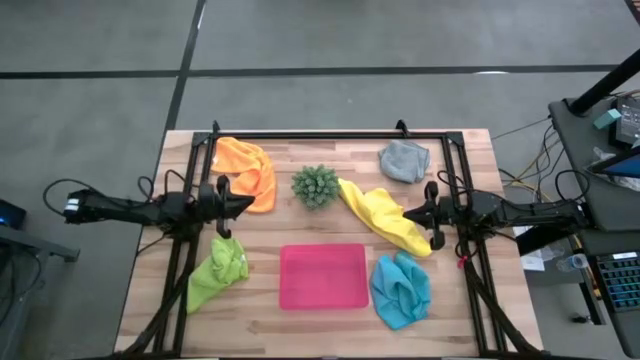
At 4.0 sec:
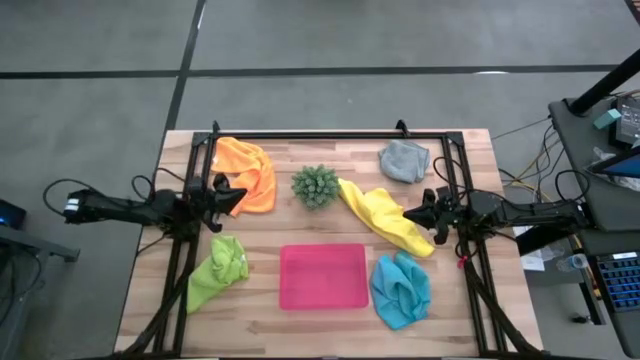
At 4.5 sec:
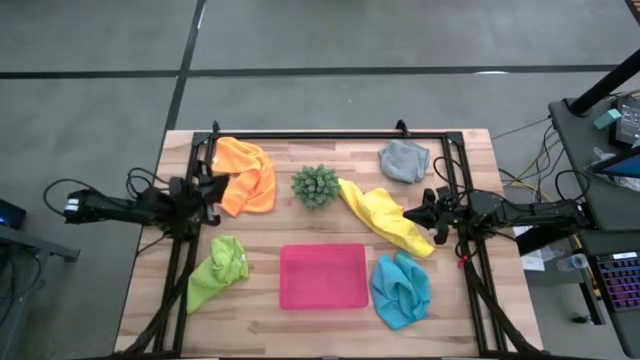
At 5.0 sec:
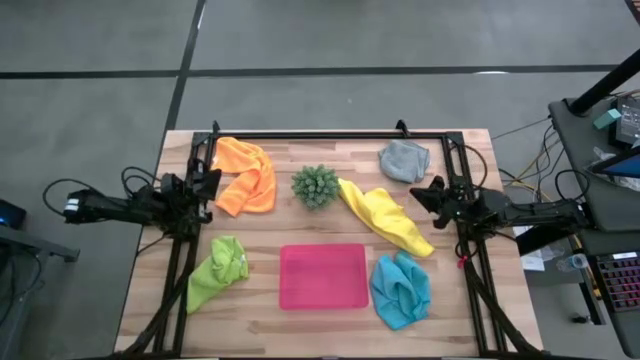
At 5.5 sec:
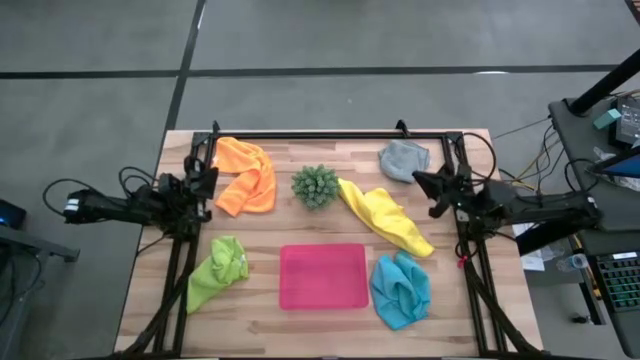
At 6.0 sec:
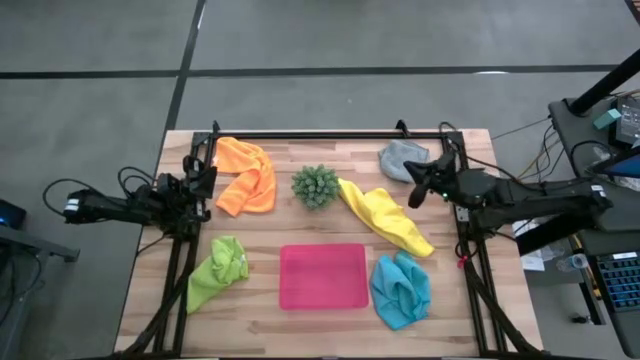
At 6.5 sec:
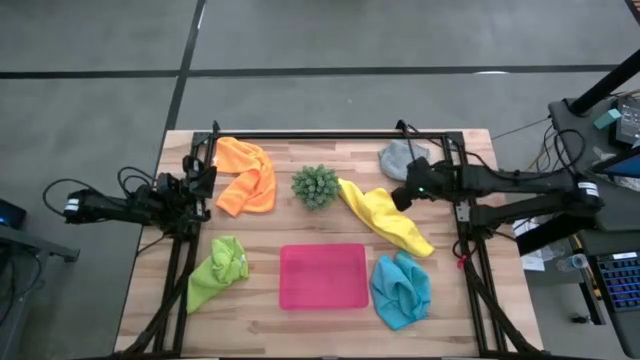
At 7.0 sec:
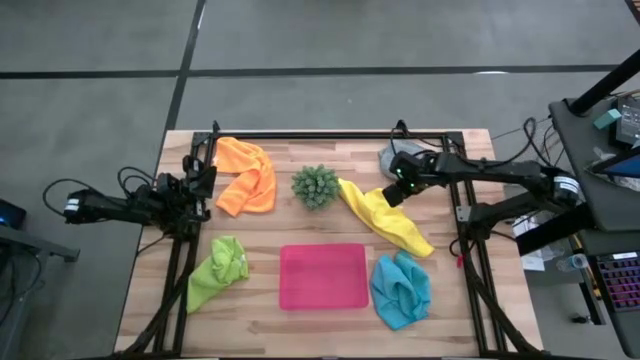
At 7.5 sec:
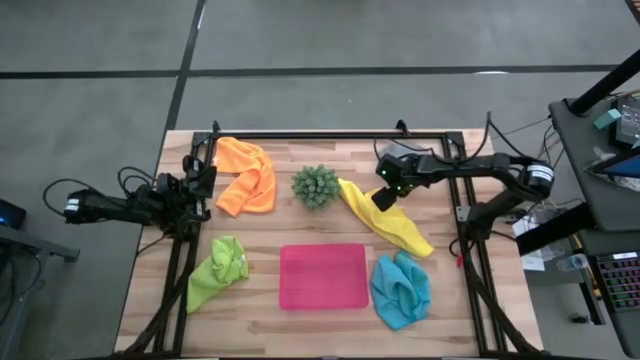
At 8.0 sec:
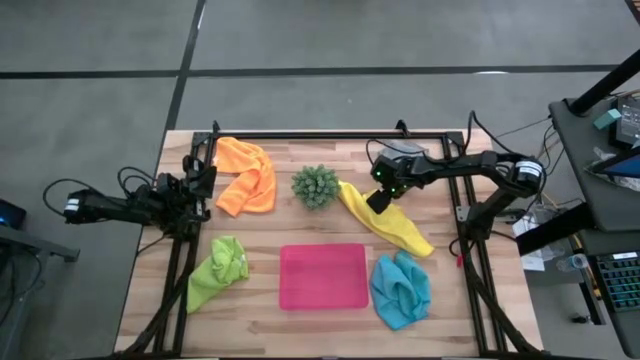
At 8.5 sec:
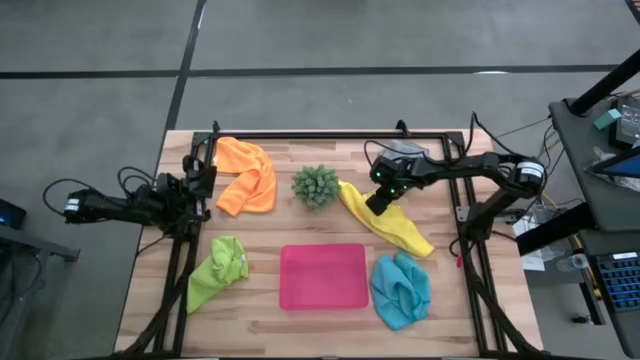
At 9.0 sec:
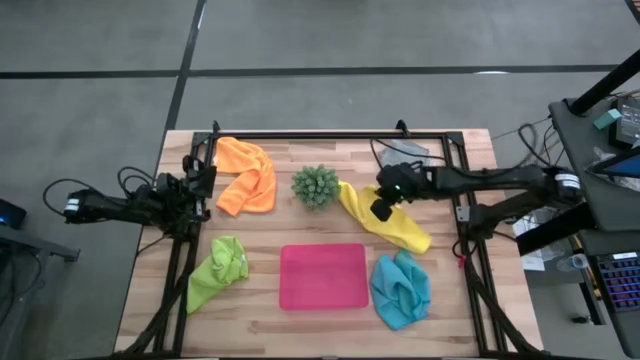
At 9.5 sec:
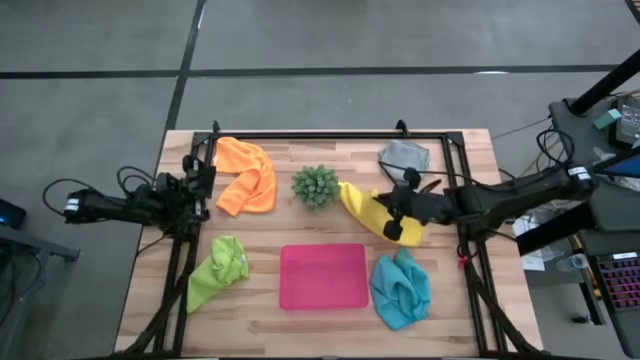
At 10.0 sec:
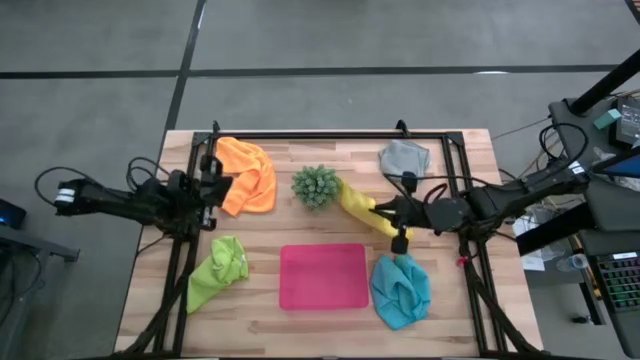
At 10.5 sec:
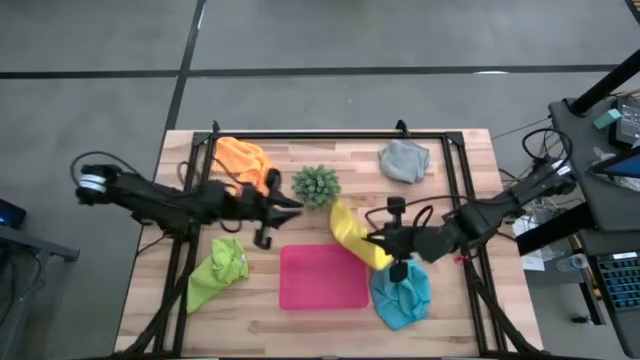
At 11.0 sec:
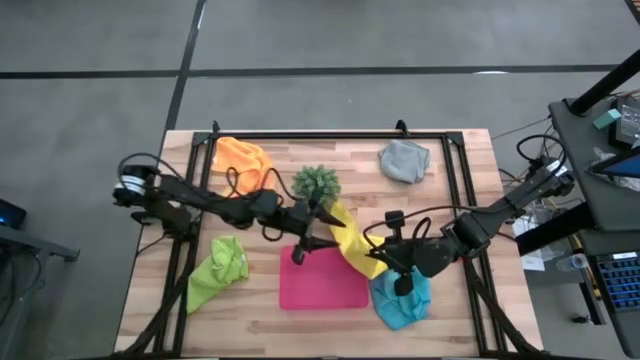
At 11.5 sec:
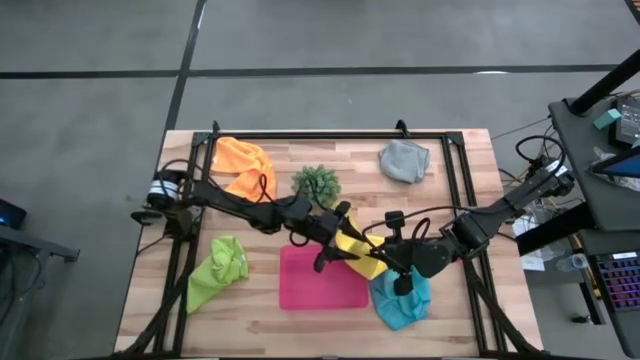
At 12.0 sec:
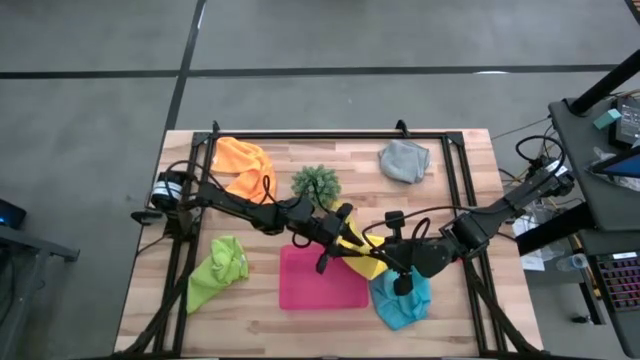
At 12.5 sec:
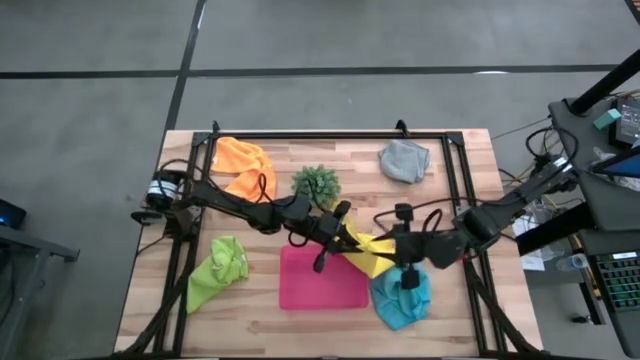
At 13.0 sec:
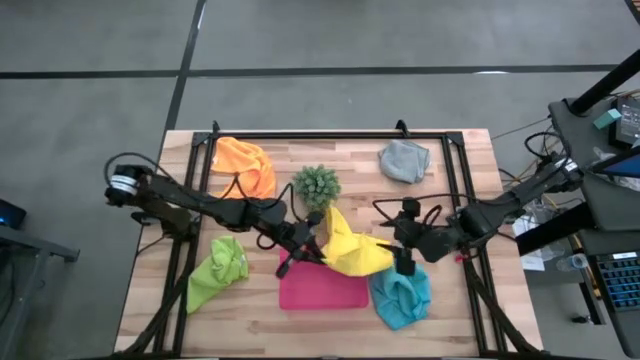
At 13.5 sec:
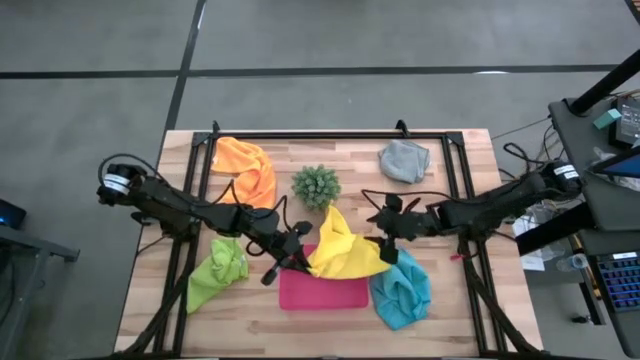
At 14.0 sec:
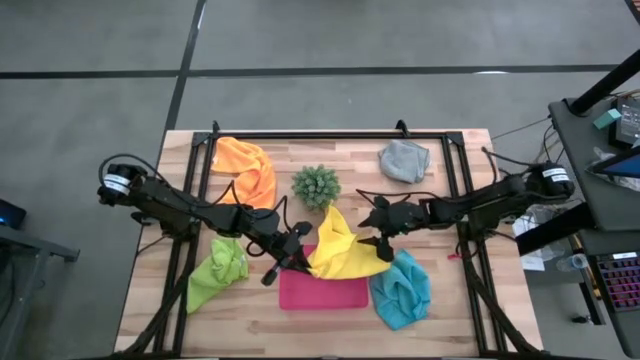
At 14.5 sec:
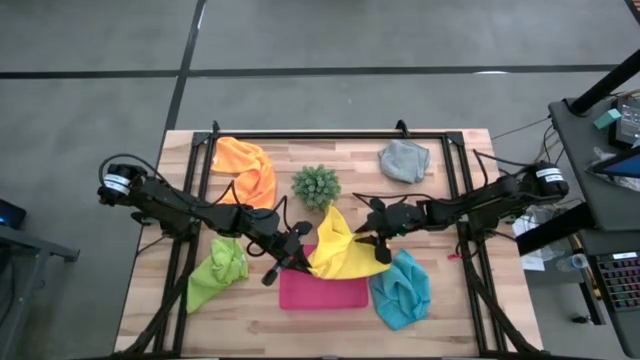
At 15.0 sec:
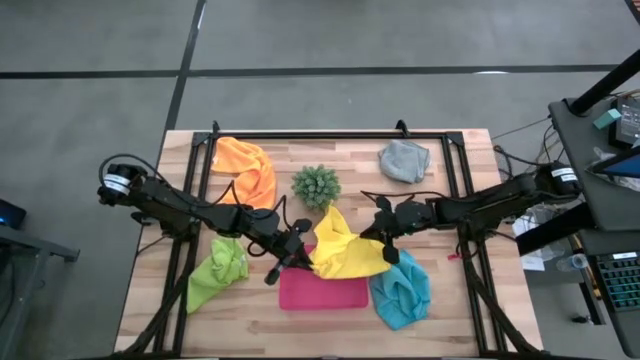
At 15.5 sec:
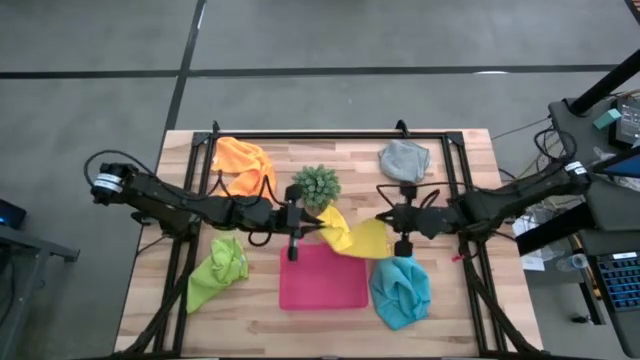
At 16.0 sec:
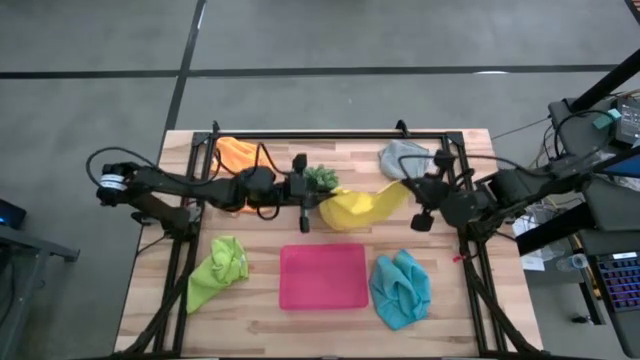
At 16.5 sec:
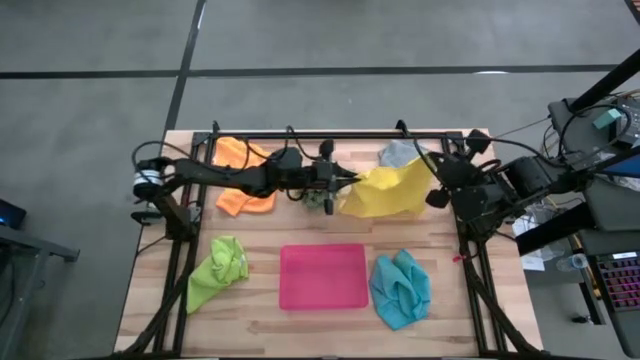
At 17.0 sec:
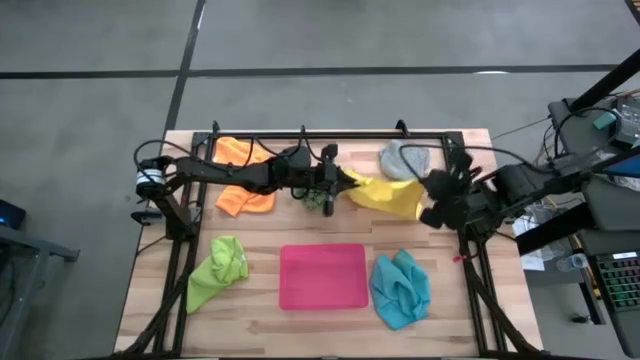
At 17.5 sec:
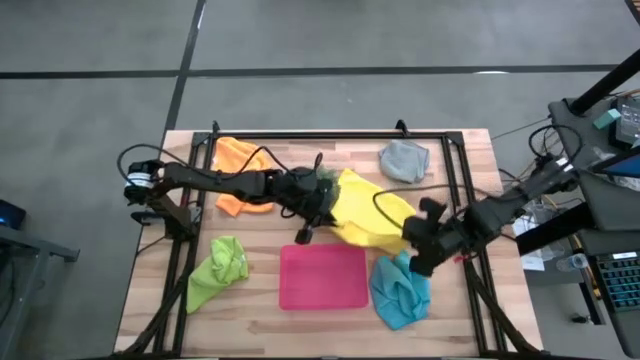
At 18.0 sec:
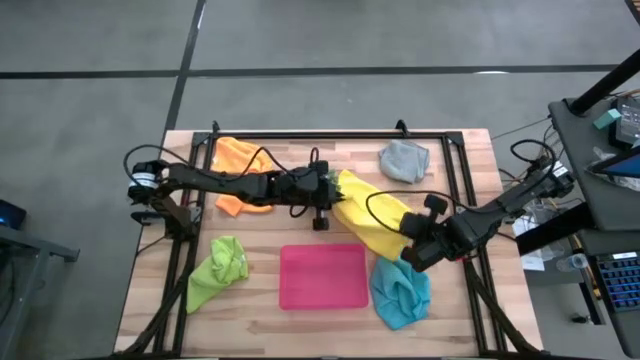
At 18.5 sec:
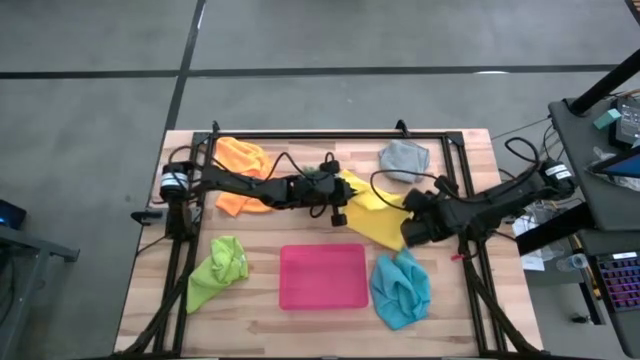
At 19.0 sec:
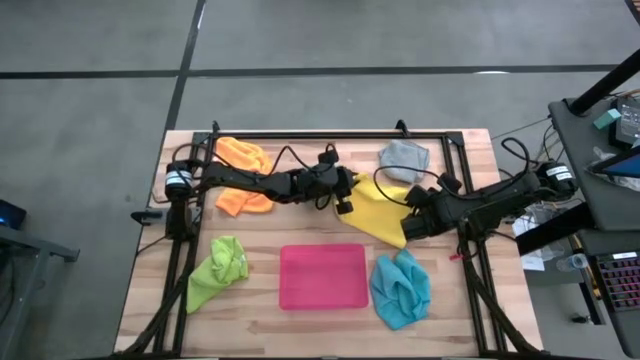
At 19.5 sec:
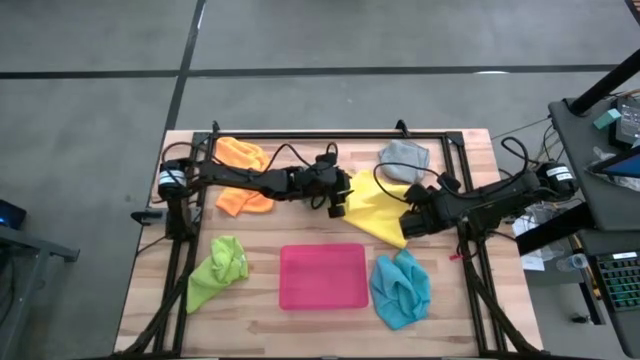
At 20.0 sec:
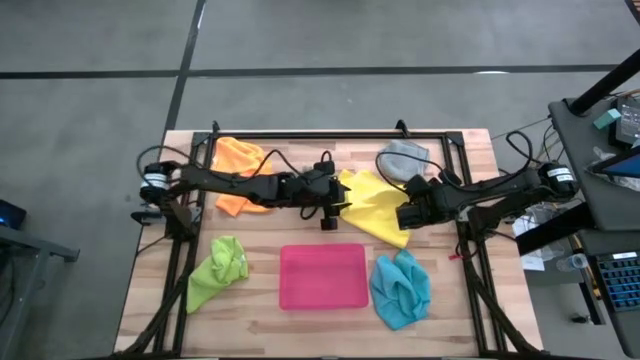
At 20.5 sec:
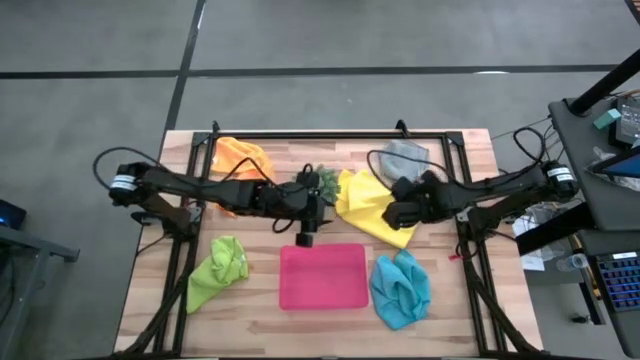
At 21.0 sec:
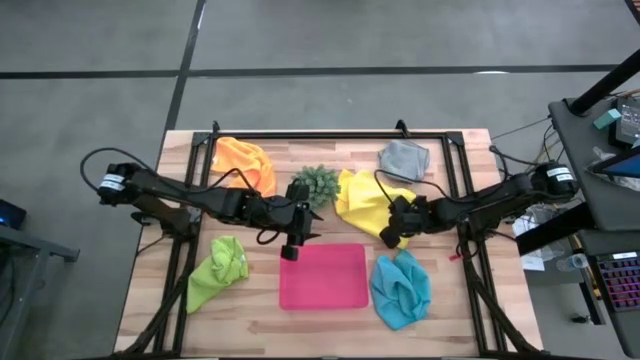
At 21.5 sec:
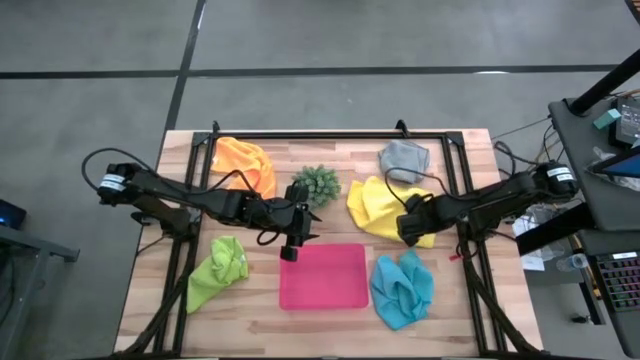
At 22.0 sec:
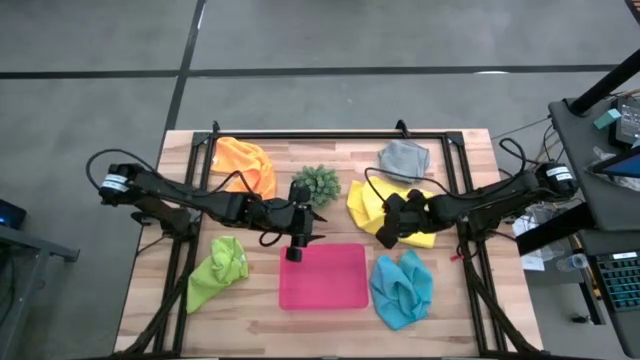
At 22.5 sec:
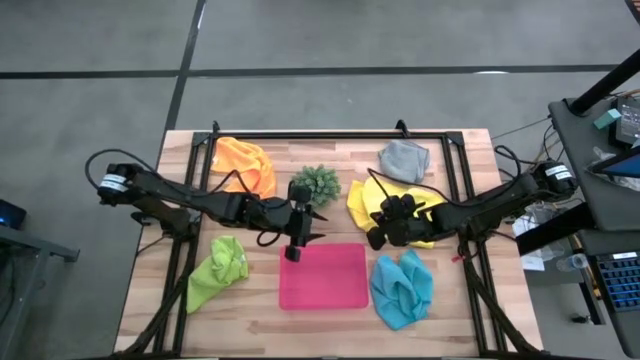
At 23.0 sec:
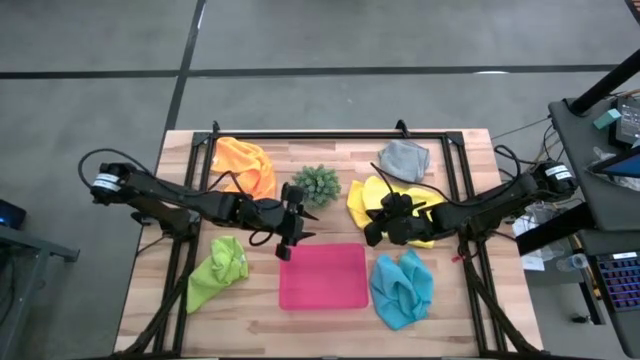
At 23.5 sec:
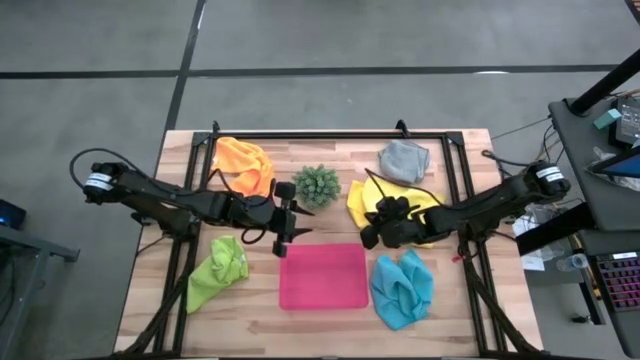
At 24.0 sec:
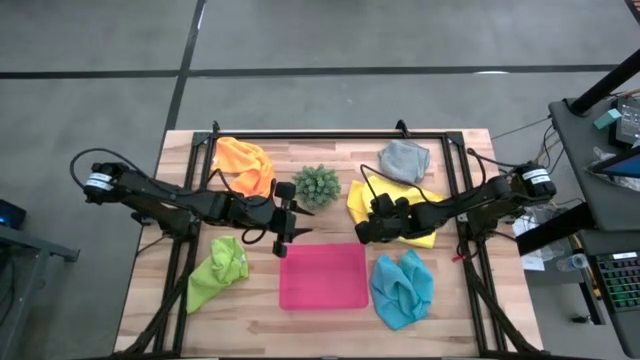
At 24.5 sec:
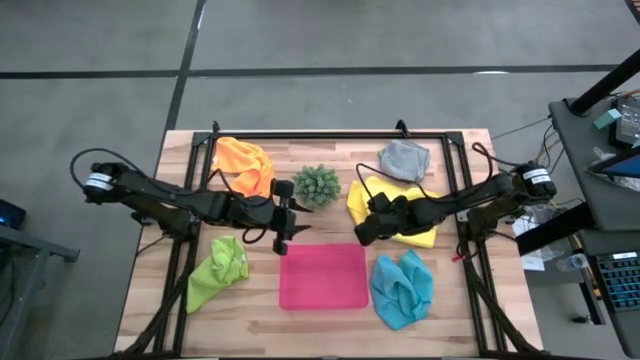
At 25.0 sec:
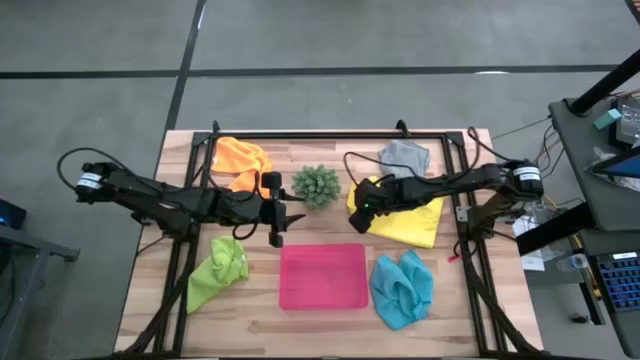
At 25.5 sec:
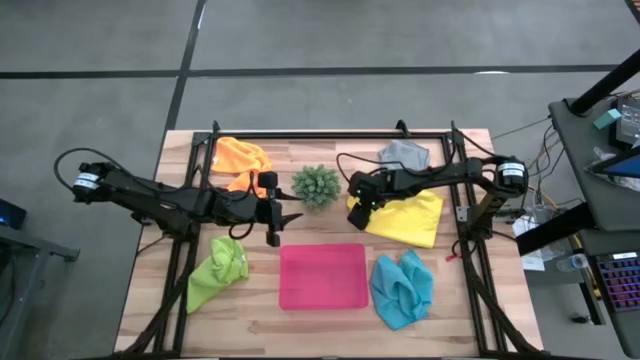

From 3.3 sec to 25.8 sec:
Task: Fold microfiber towels
Fold the yellow microfiber cloth

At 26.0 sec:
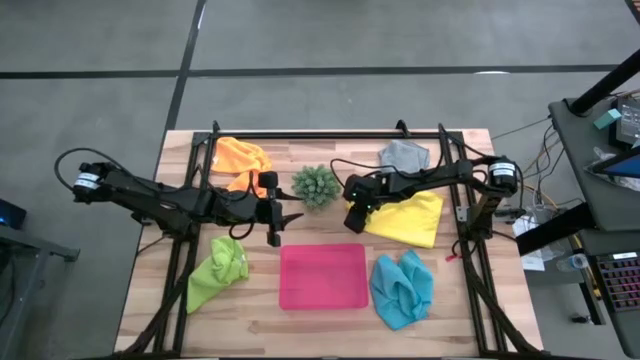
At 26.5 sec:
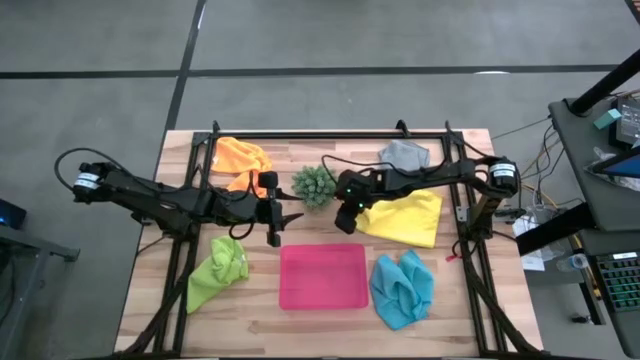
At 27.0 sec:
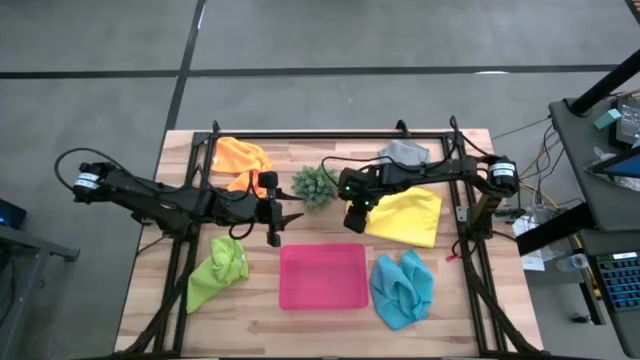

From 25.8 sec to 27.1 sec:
Fold the yellow microfiber cloth
